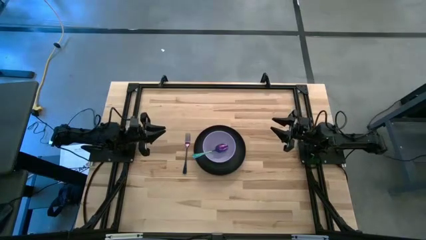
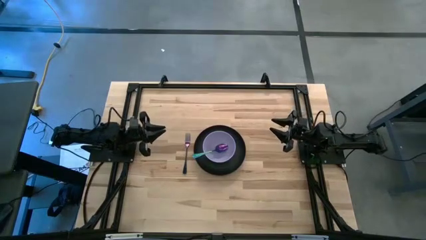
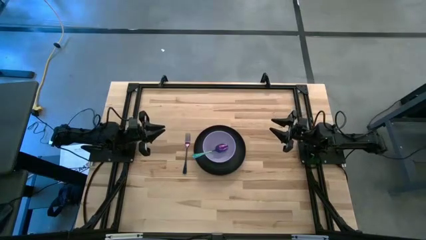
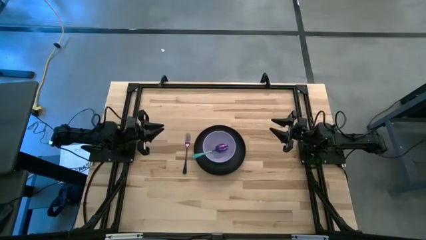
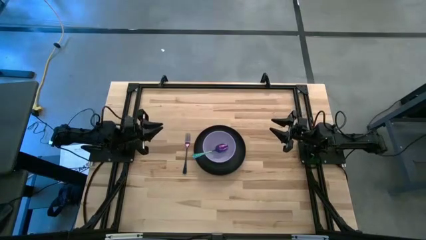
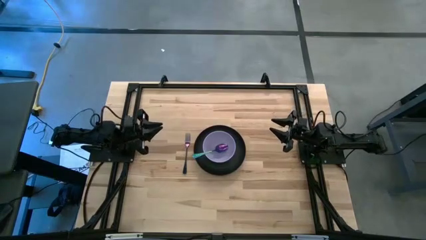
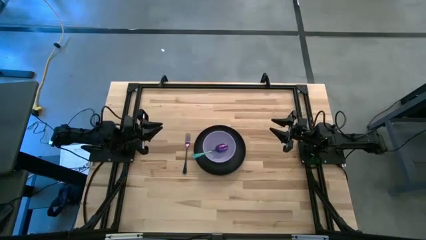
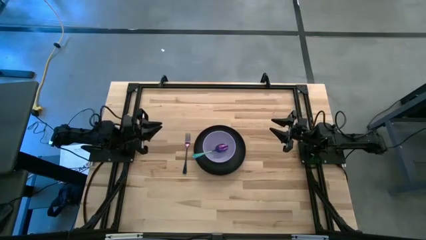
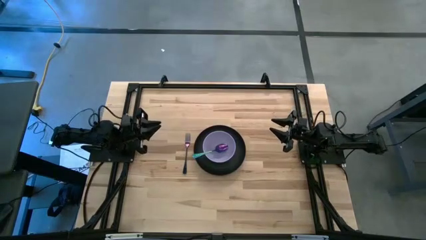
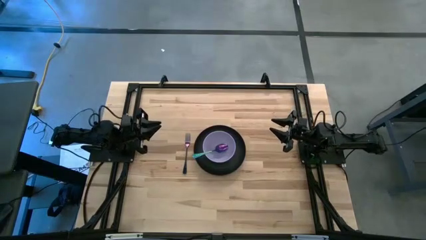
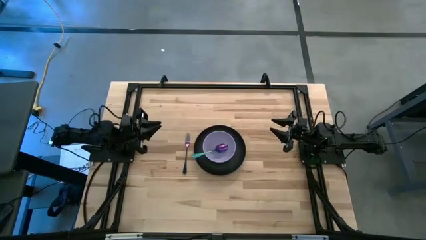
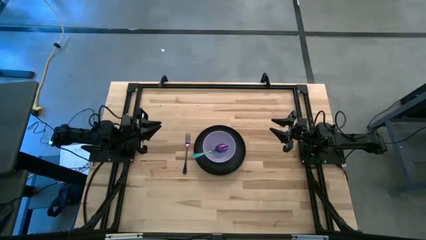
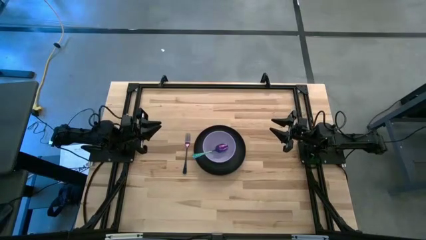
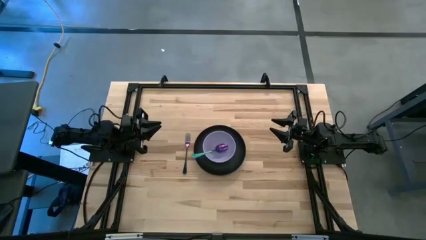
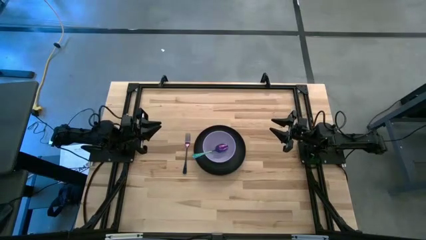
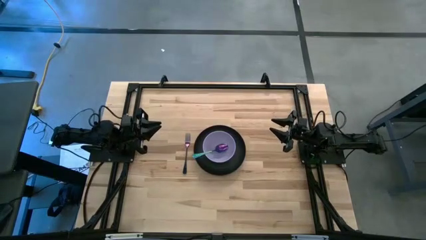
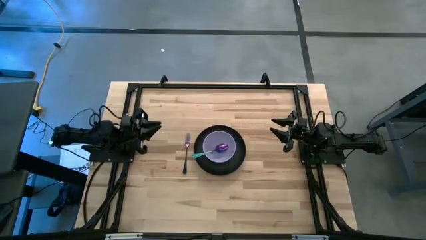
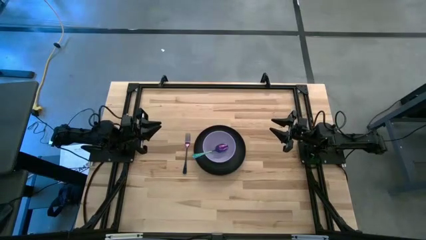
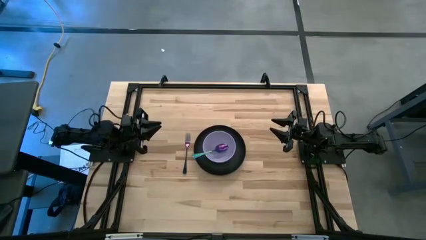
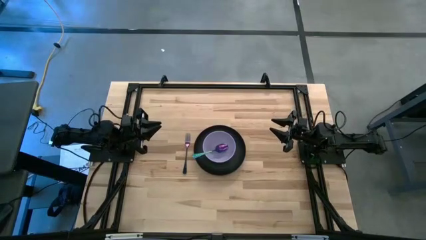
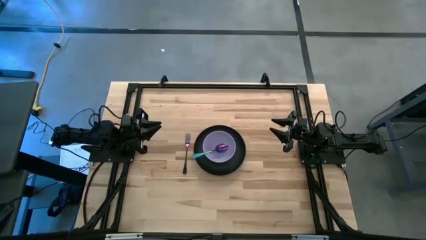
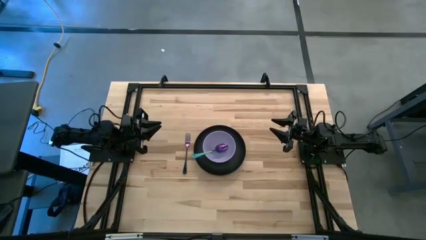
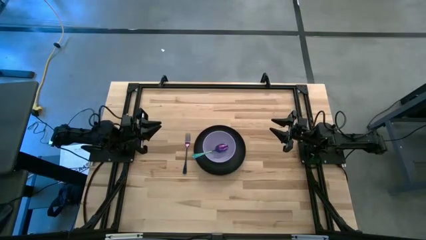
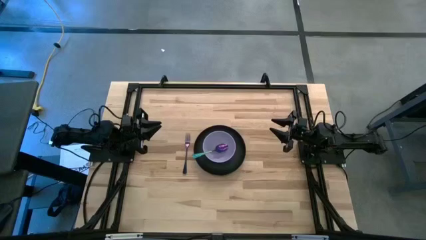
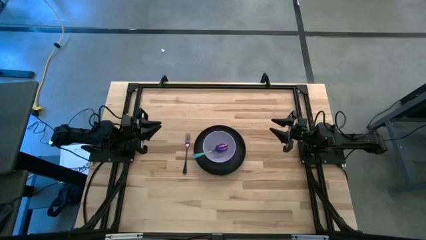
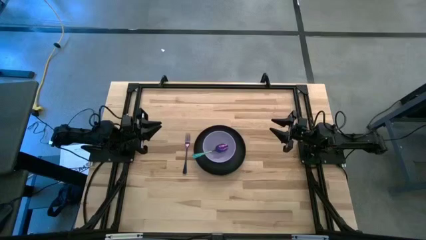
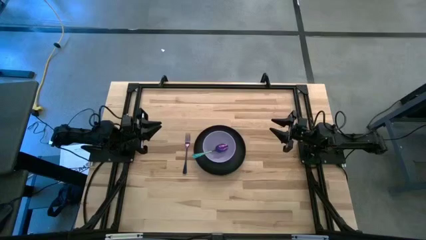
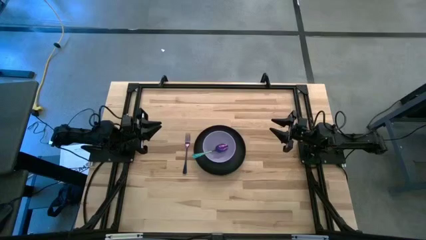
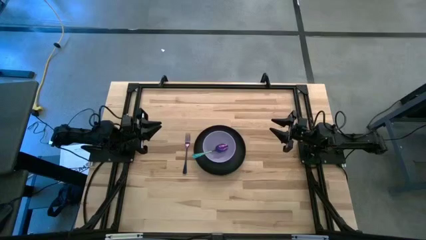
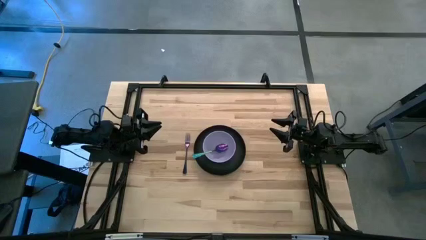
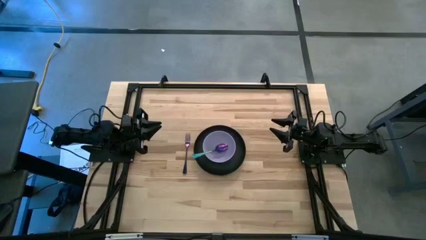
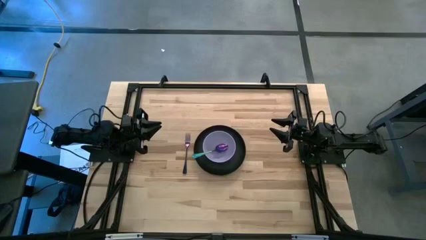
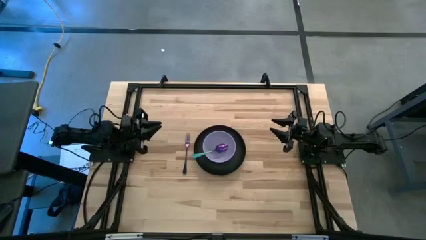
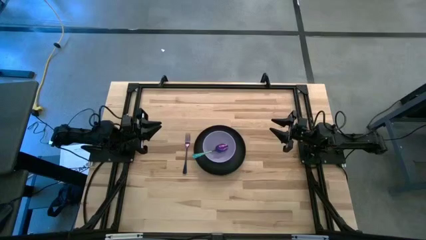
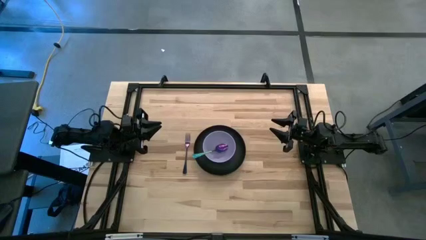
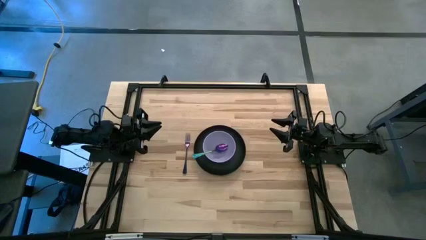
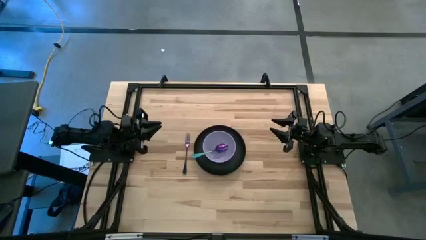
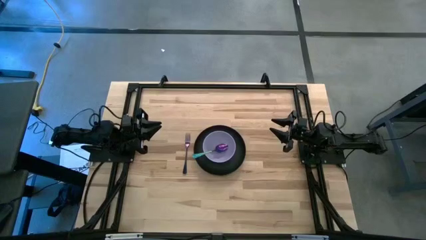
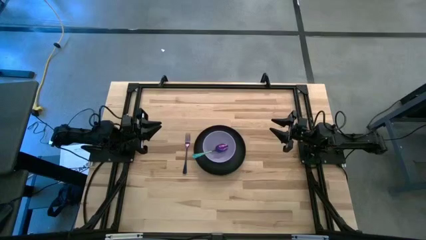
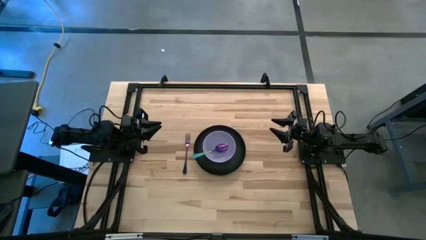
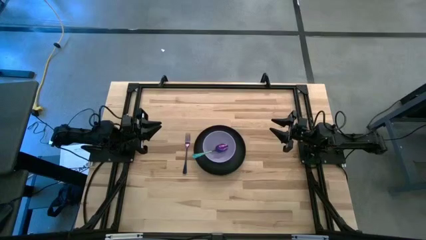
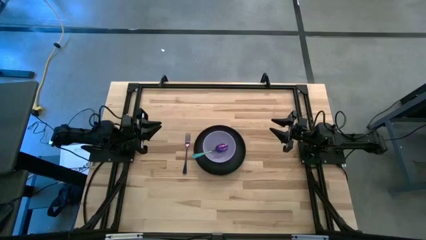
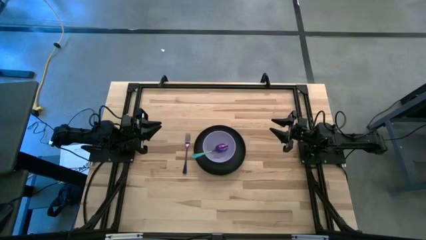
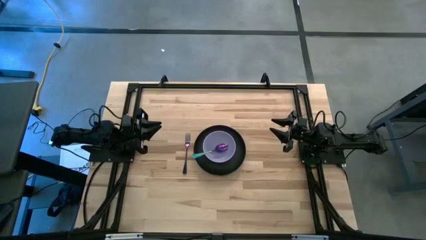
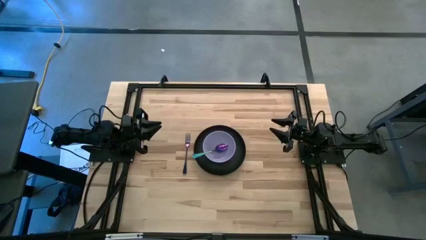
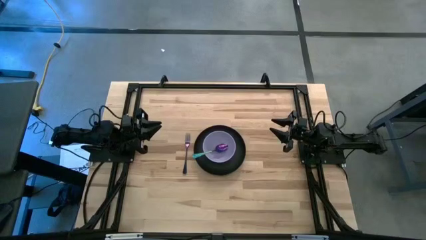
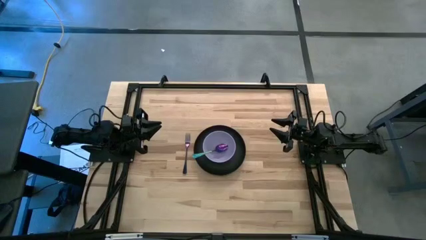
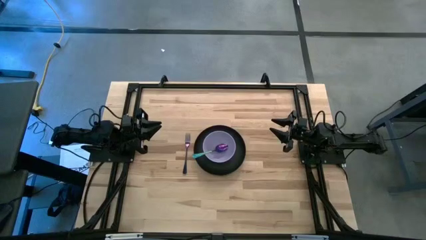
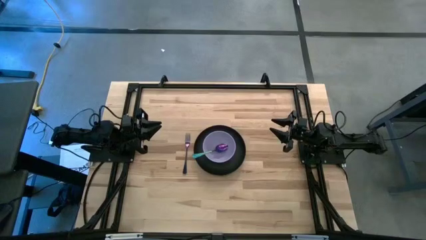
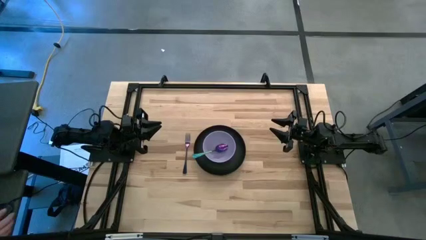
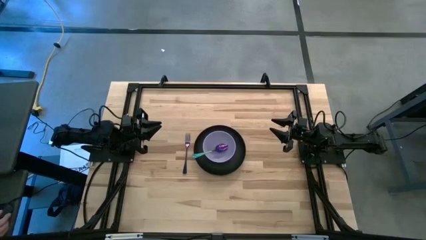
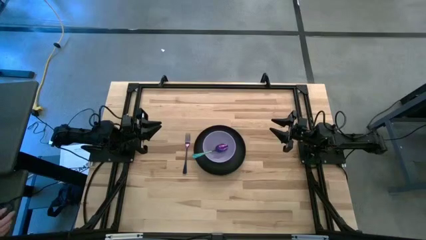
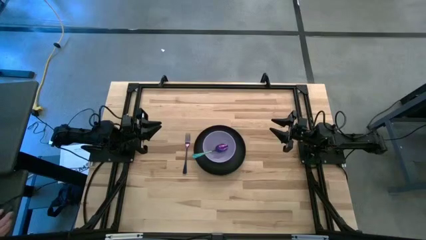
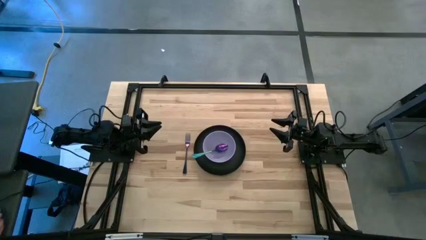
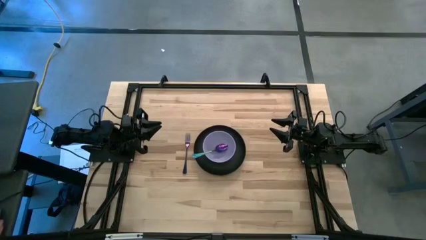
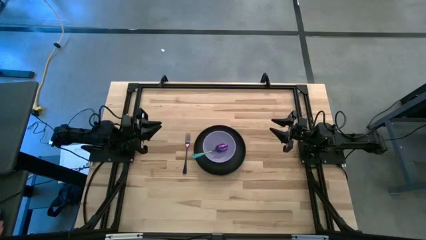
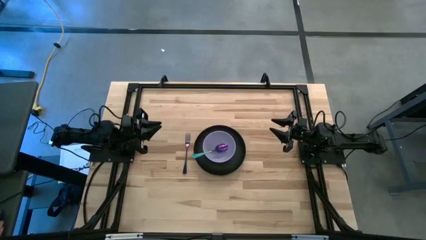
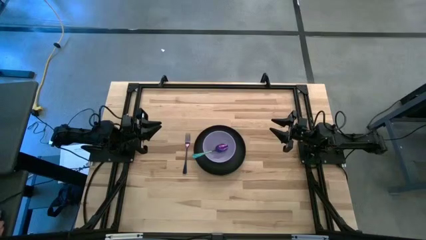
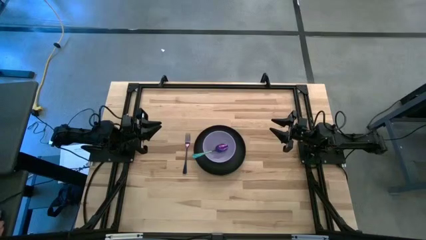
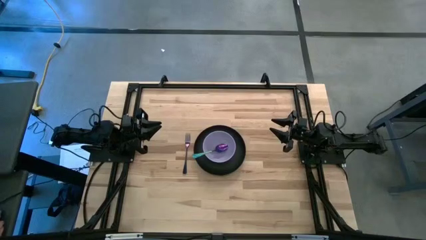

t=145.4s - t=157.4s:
Task: Set table place
Return to Home Position

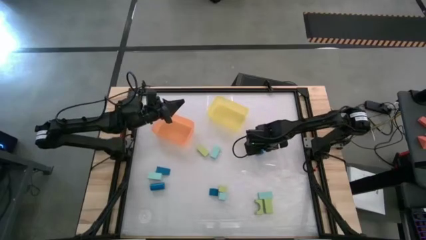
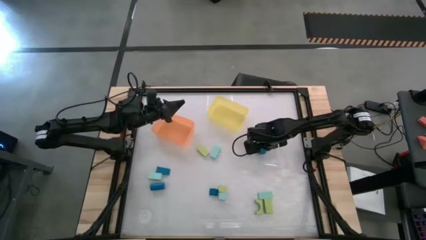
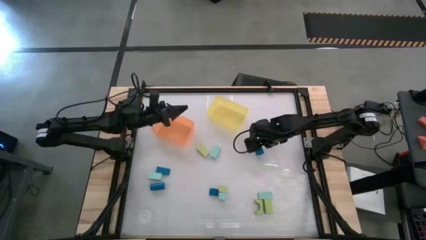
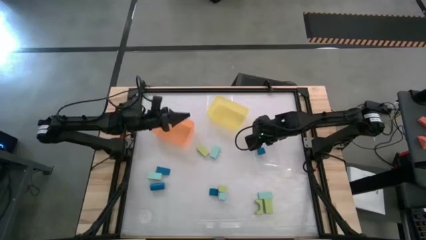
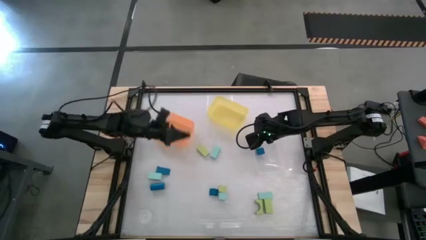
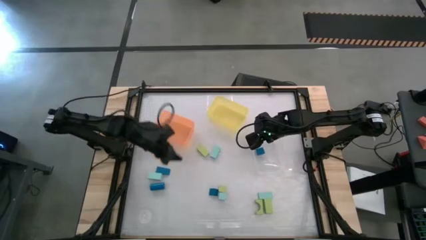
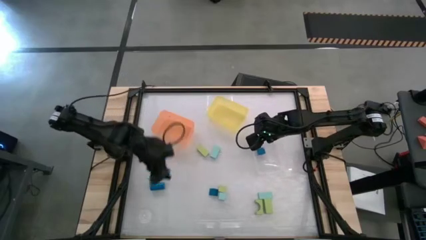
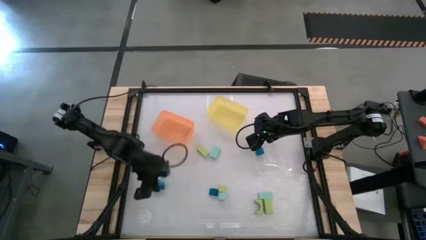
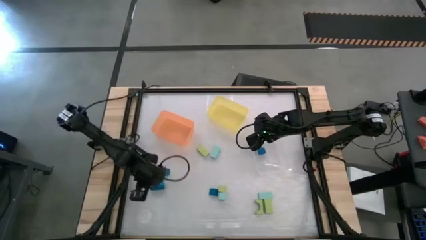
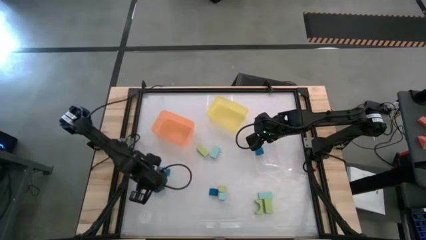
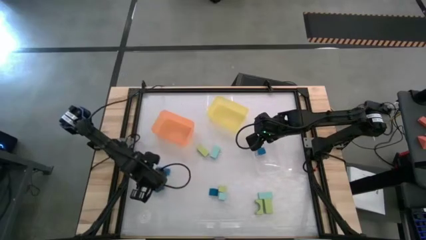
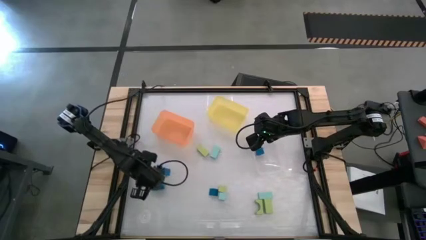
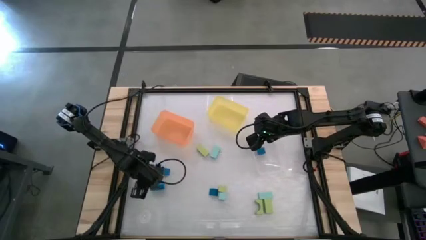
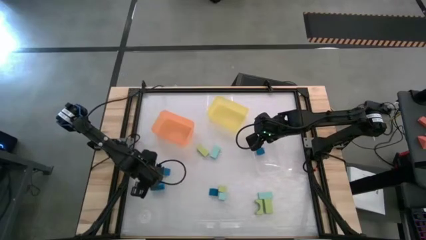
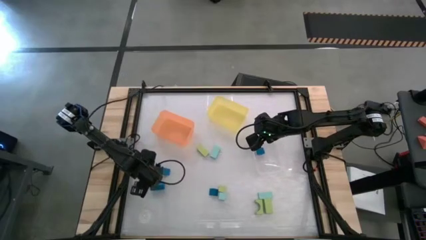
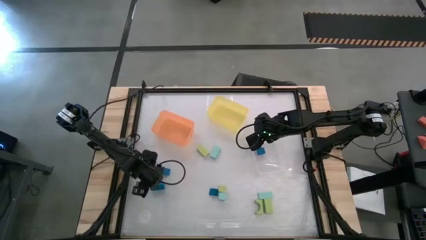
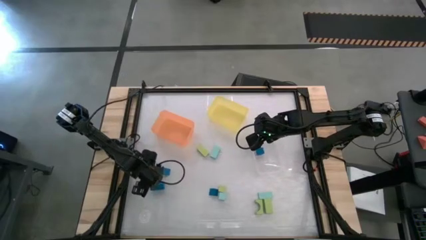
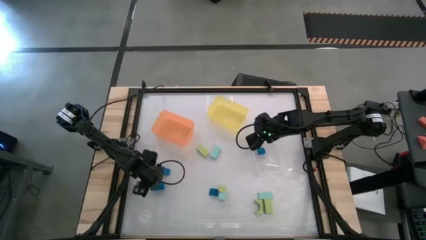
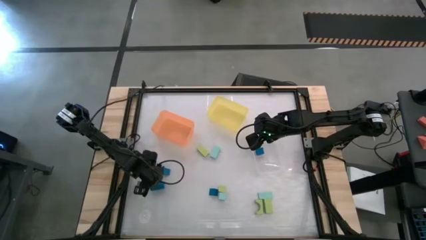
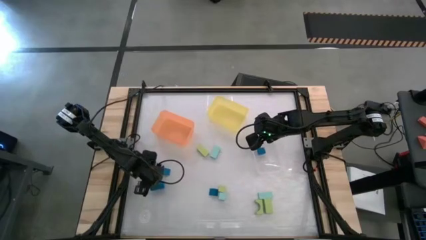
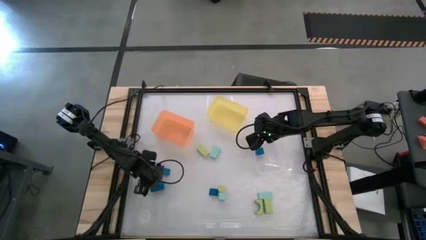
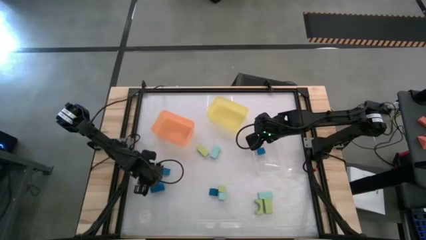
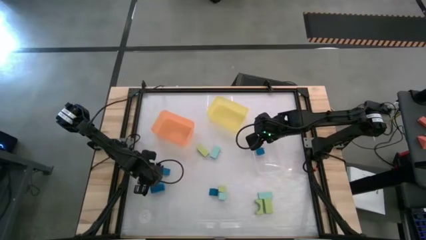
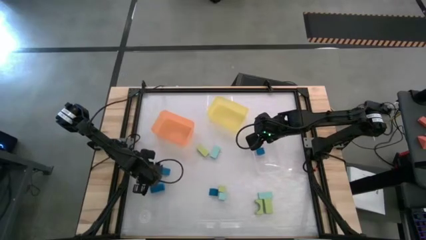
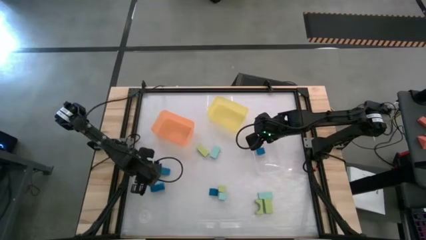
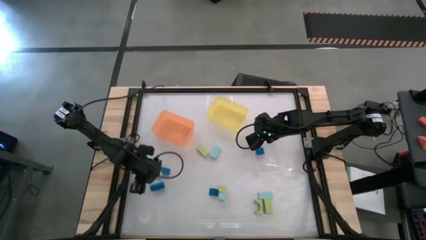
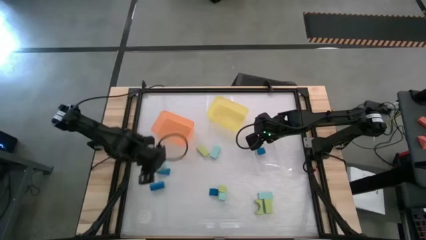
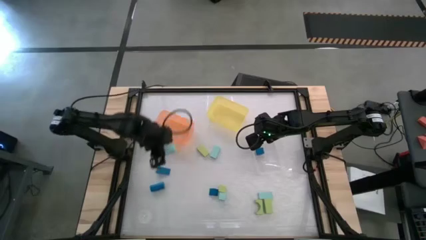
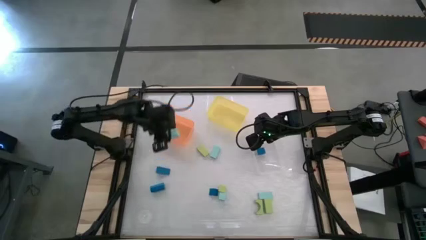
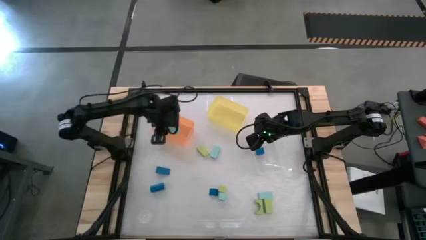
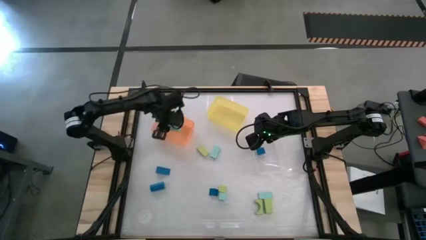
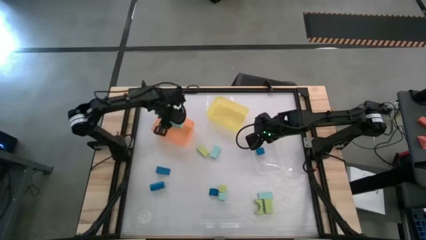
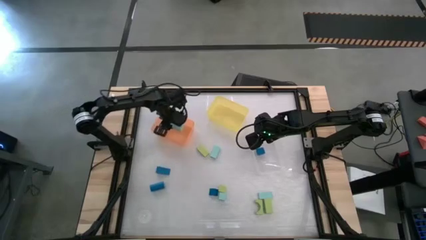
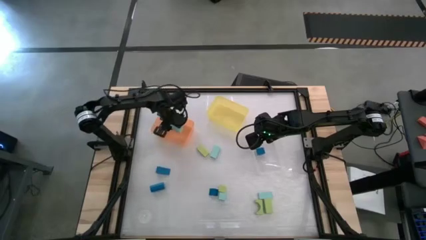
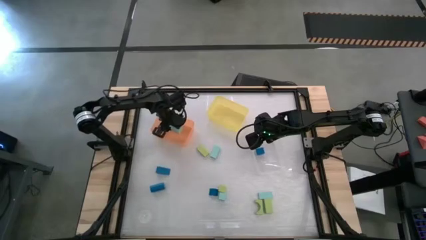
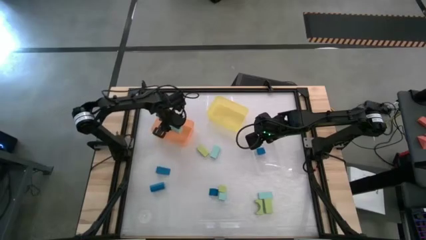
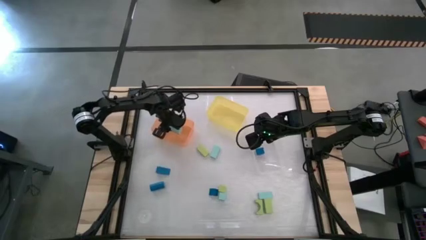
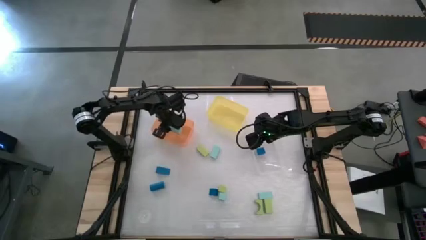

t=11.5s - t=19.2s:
Task: Sort & place blocks by color
Put the light blue block into the orange bin
